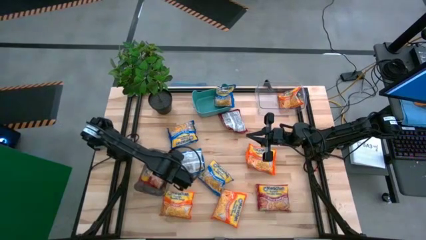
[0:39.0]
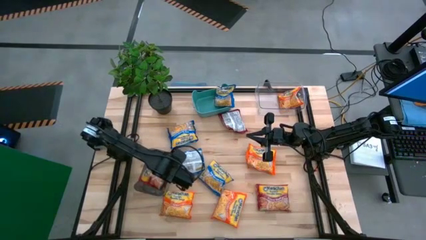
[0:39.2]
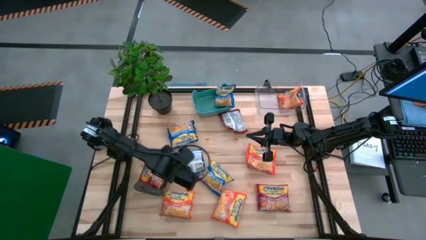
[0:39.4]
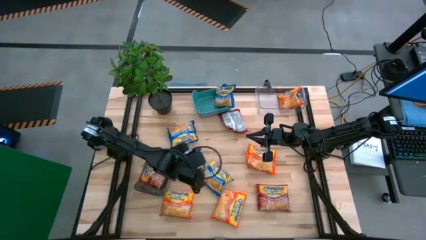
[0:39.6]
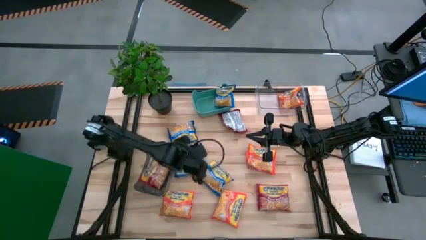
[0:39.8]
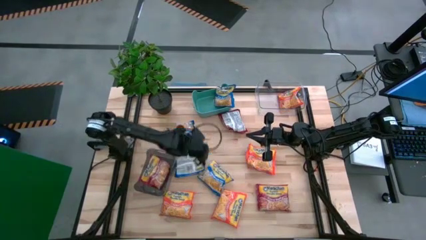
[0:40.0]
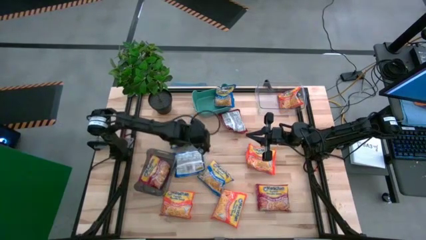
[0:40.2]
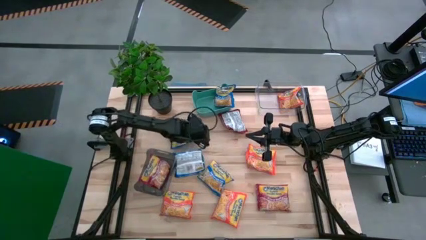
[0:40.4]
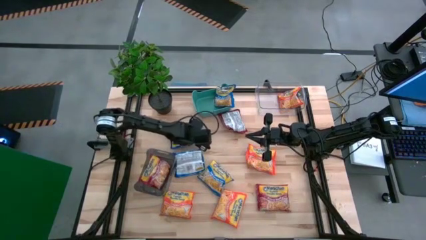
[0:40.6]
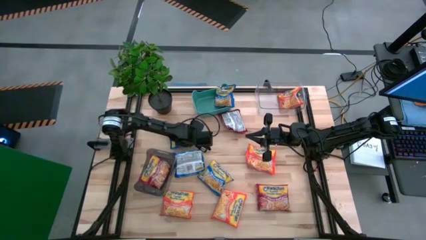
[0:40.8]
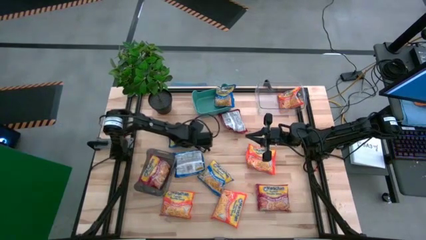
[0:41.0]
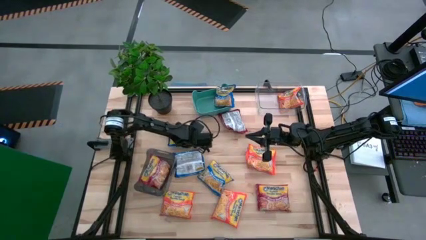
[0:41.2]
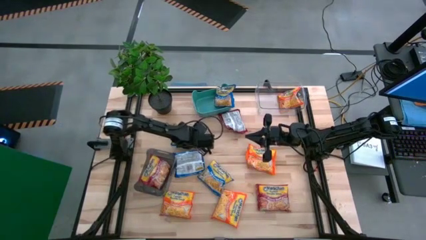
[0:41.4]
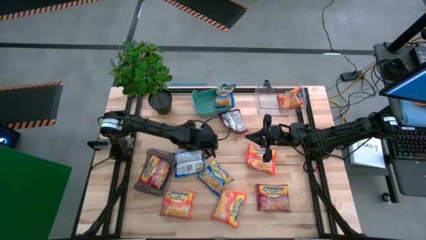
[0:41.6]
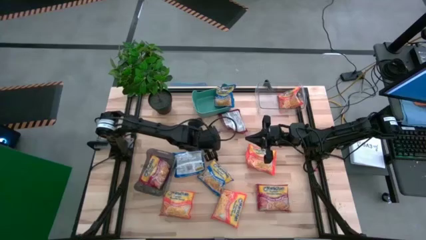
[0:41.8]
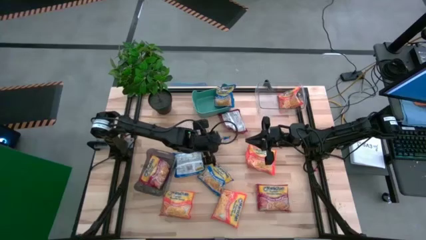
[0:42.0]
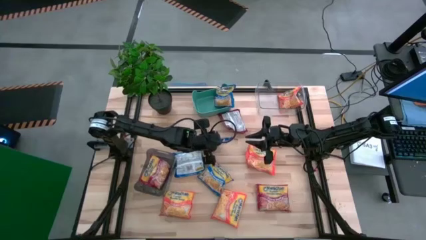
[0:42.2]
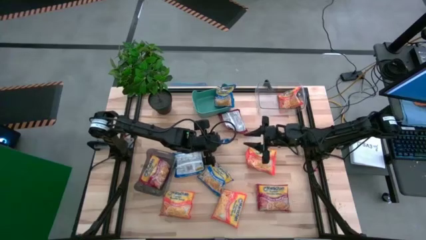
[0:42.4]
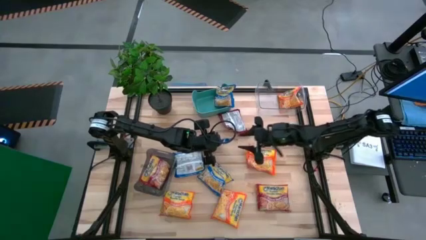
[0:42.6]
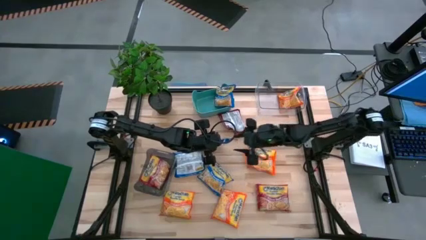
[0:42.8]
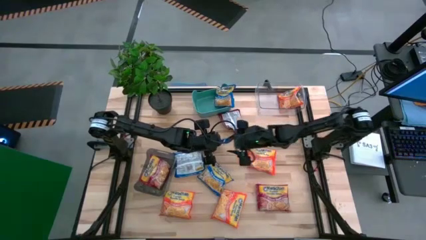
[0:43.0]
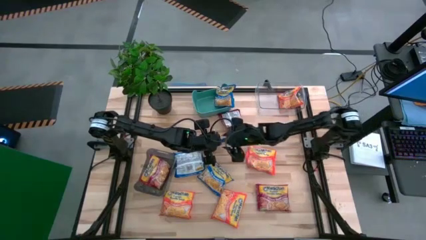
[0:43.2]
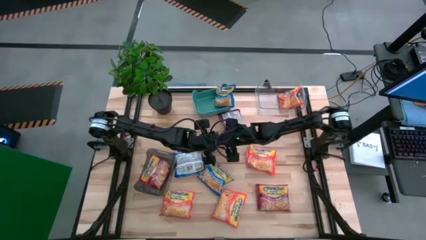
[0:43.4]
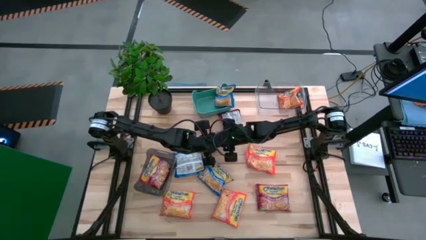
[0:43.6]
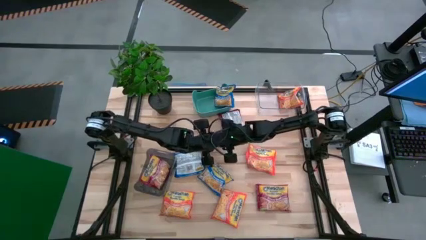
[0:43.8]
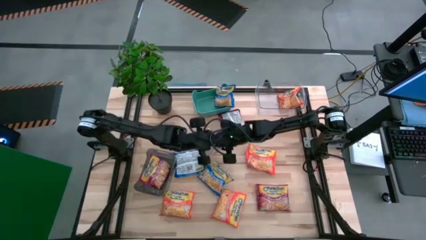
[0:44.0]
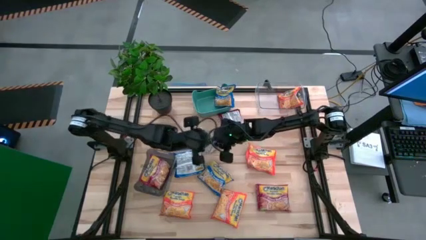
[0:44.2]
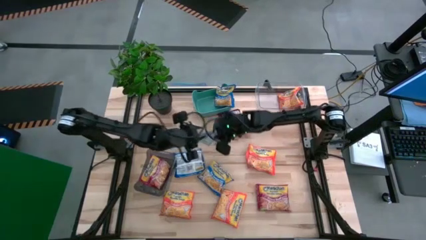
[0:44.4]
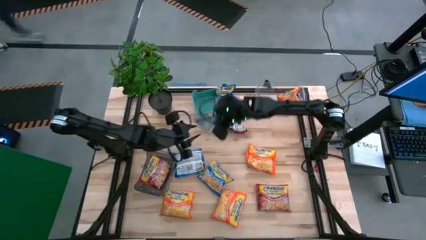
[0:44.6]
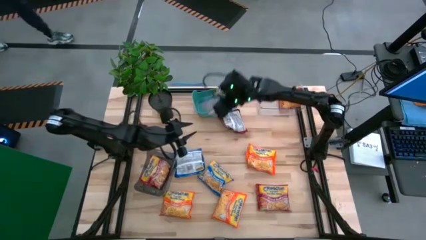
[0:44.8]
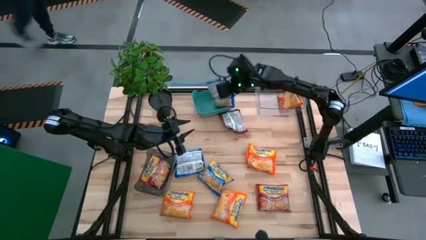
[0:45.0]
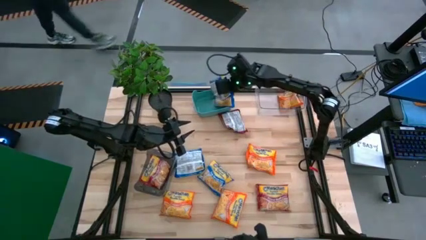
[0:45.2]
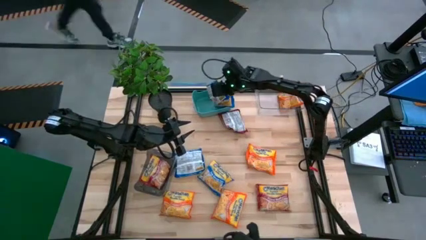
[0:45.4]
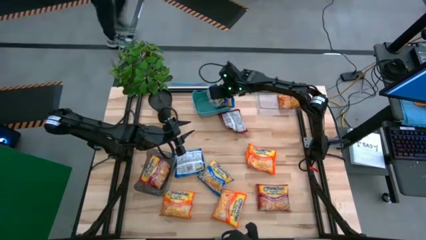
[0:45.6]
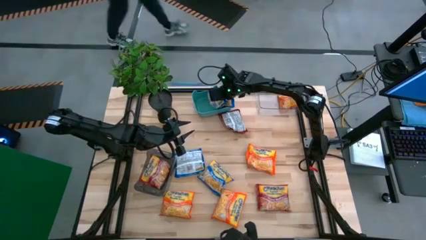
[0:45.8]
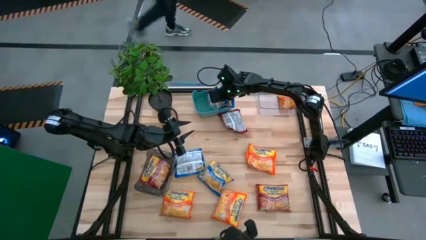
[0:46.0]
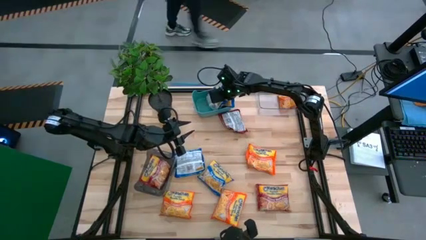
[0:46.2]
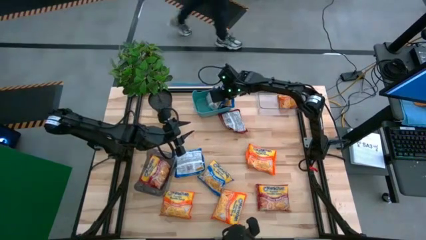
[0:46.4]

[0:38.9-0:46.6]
Task: Sort Maruchan noodles
Put the top blue noodle pack into the green bin

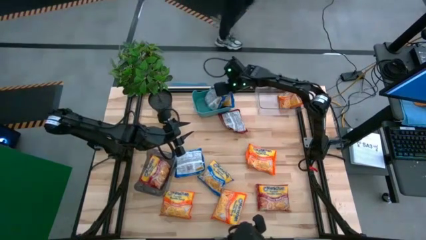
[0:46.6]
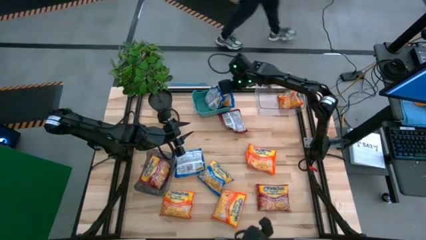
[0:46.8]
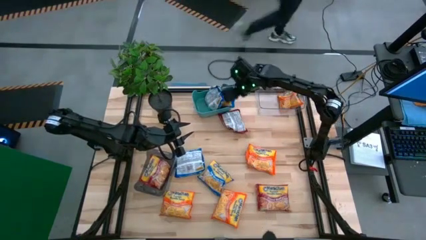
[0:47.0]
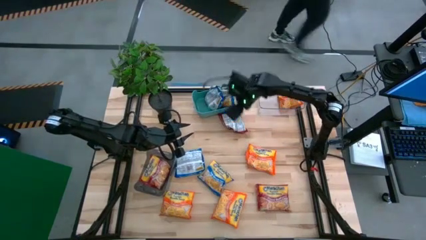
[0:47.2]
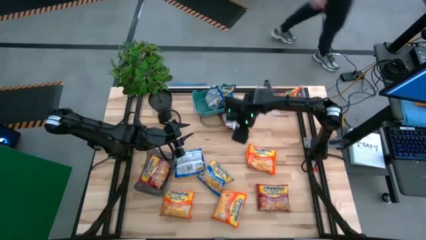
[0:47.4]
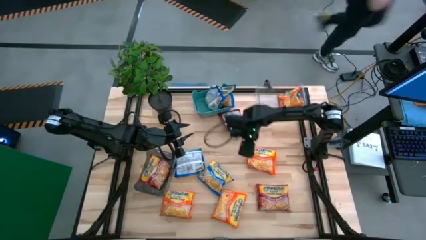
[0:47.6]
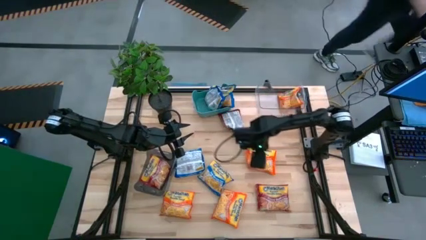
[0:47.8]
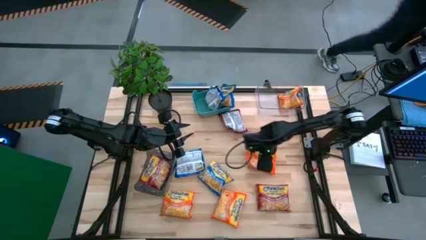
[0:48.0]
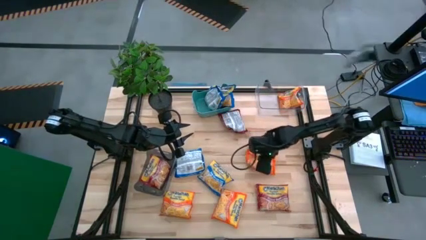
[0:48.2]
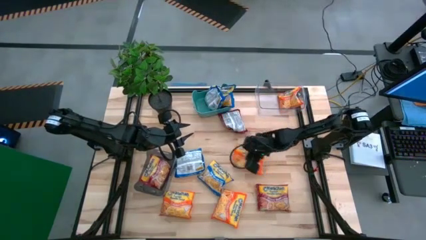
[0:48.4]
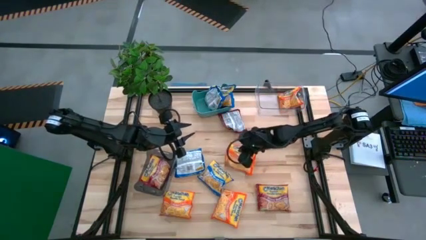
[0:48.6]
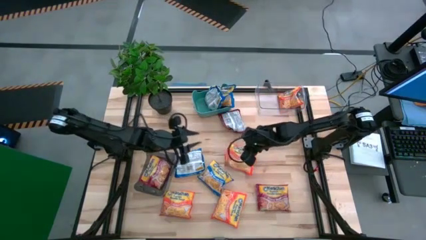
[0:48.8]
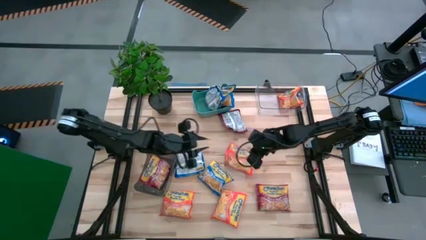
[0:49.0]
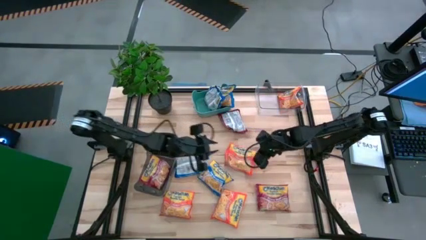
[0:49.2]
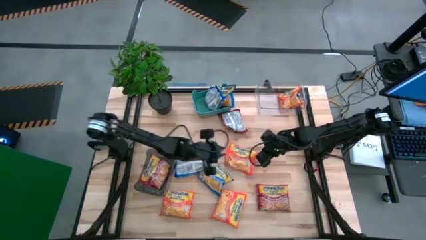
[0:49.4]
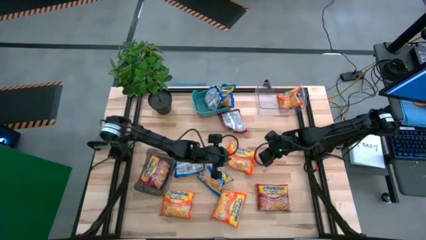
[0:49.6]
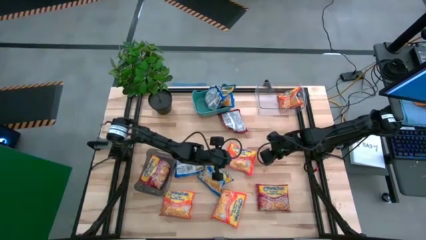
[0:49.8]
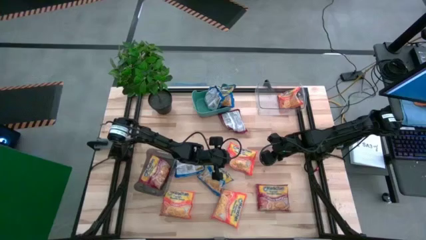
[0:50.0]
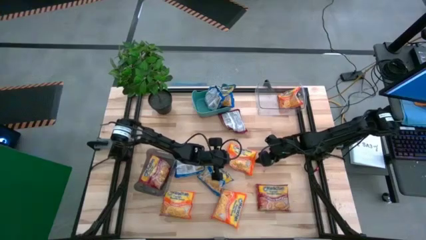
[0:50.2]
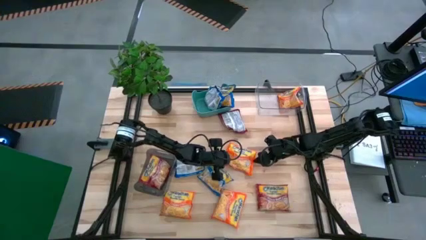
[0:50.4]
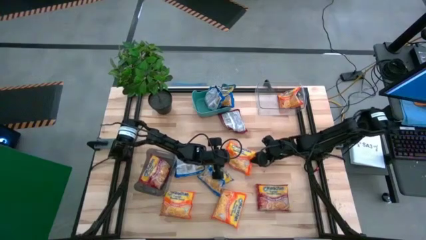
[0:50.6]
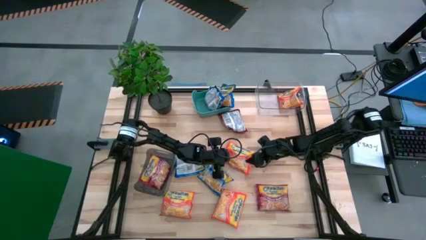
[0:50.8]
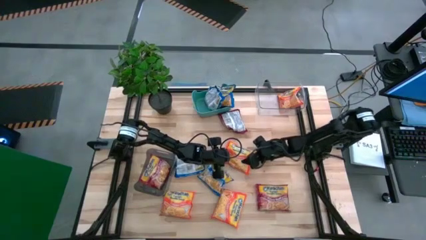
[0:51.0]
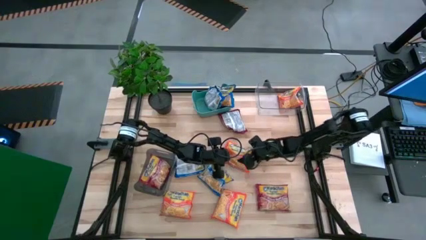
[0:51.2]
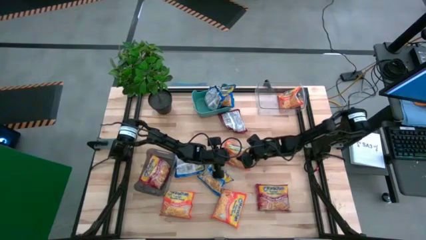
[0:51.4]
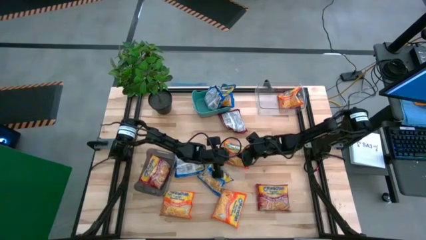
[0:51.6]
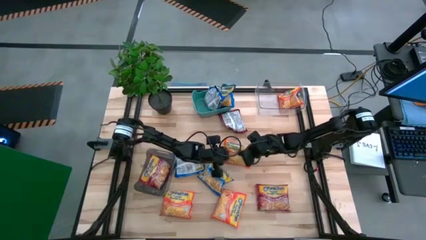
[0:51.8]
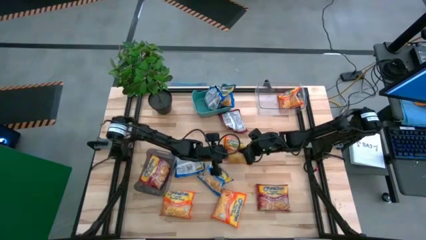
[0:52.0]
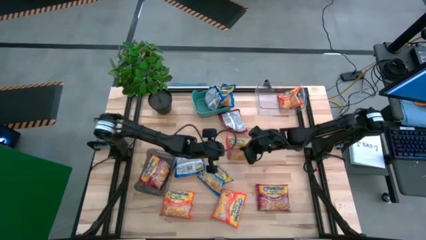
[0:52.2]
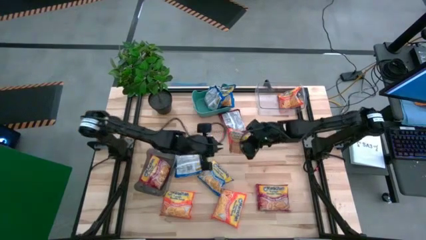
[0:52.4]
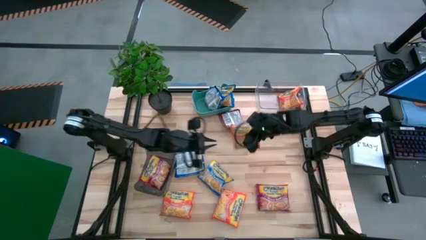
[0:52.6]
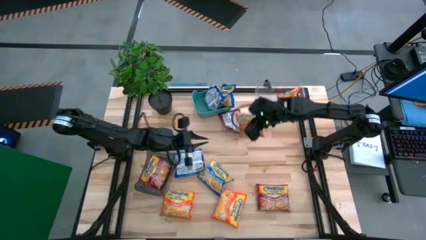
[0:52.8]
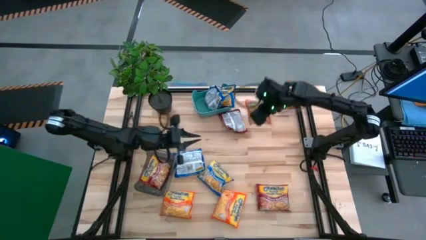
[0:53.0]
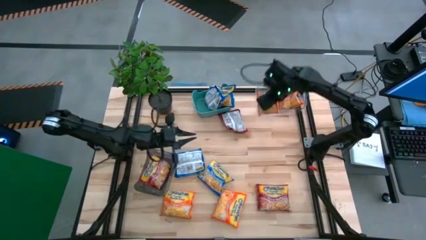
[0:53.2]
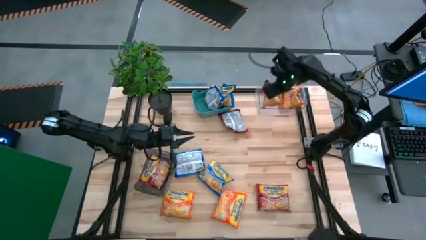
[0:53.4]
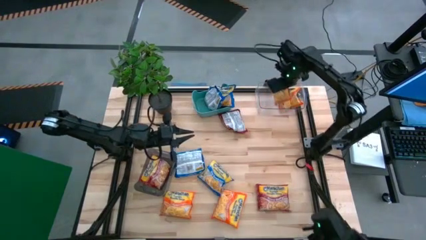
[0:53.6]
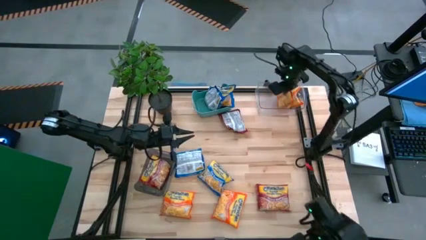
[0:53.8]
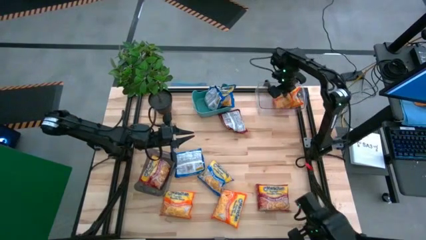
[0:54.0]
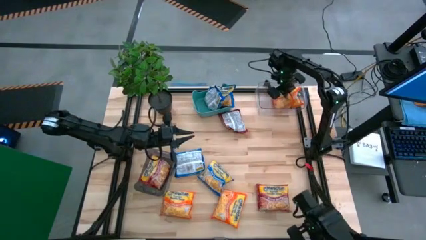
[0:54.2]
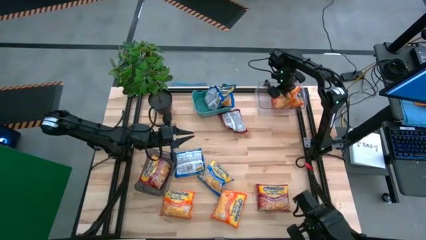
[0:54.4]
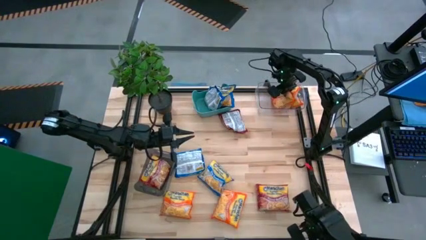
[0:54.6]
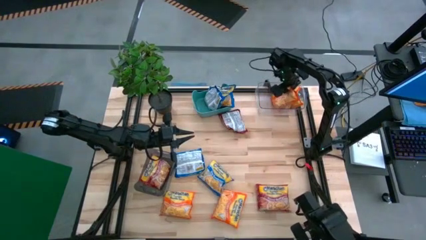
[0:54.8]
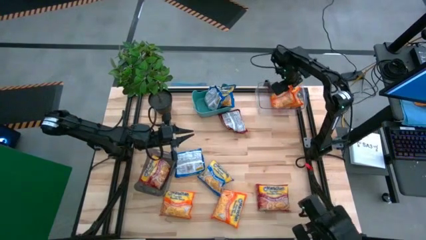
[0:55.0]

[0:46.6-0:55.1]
Put the top orange noodle pack into the transparent bin

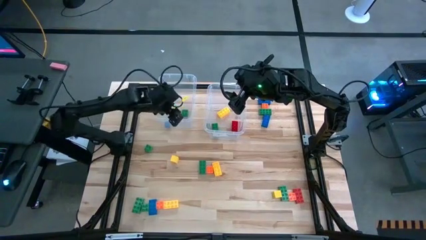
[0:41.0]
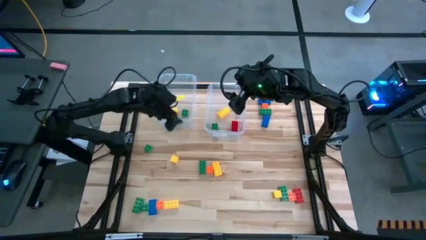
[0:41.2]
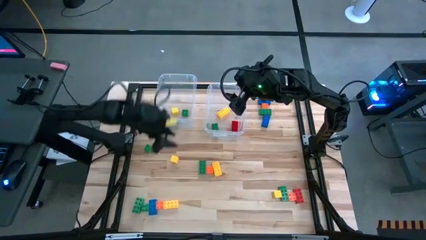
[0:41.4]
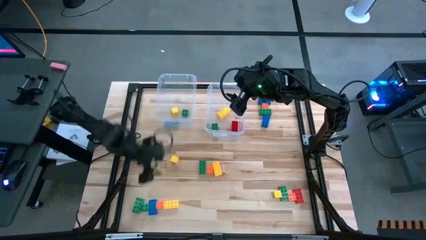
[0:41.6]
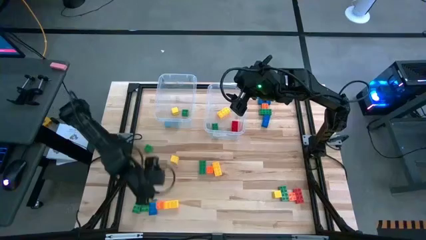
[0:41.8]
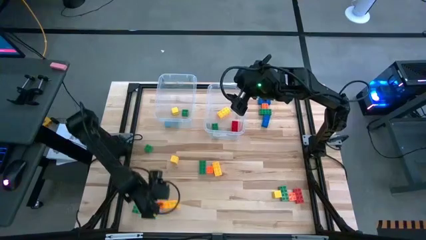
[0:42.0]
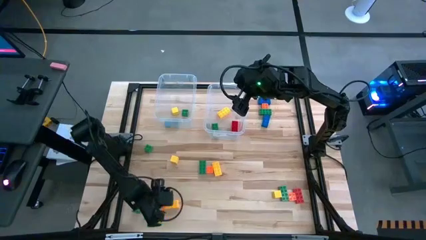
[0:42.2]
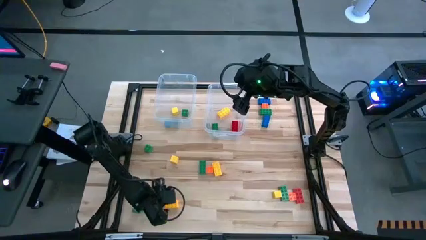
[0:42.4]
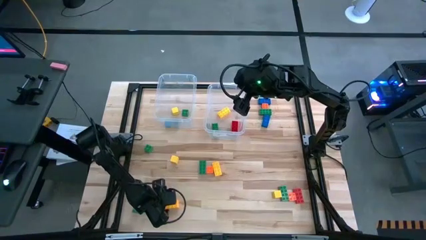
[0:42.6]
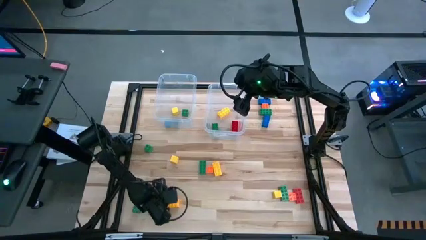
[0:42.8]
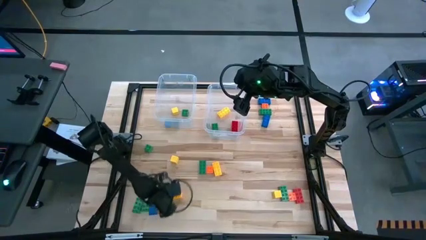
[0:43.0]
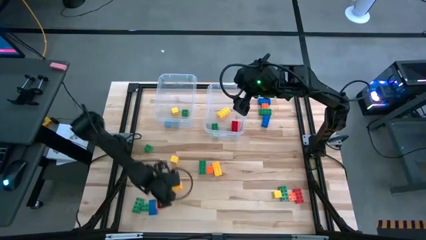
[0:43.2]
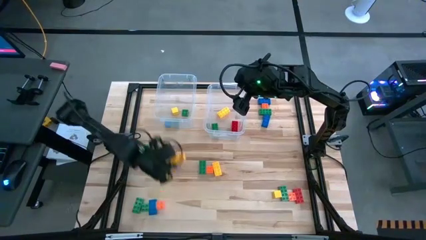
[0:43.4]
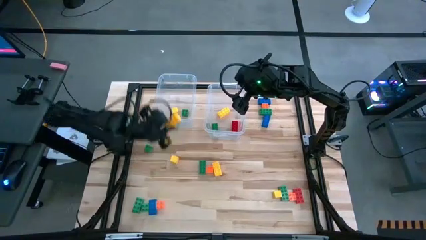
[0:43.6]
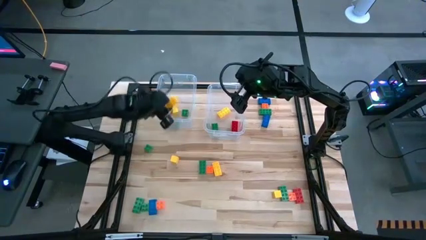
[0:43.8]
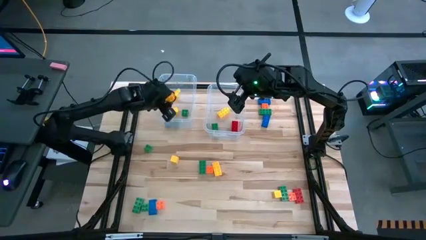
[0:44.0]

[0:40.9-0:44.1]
Task: Sort blocks by size
Put the yellow big game piece into the right transparent bin
